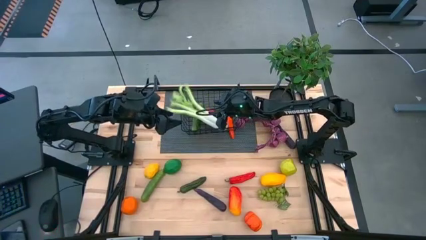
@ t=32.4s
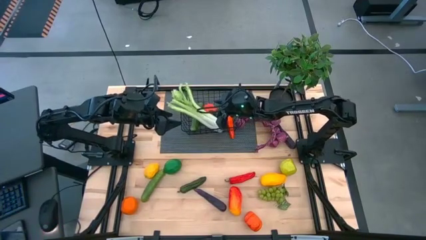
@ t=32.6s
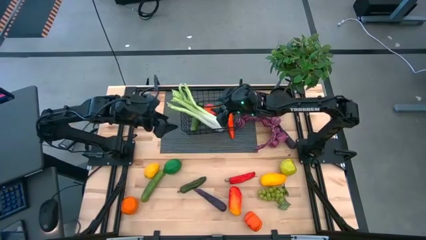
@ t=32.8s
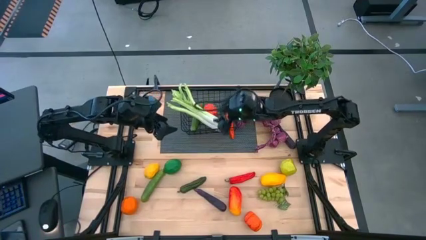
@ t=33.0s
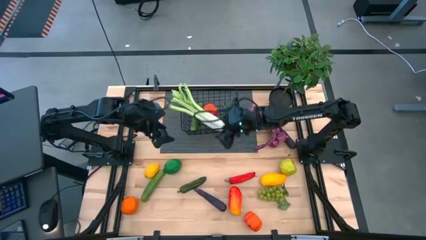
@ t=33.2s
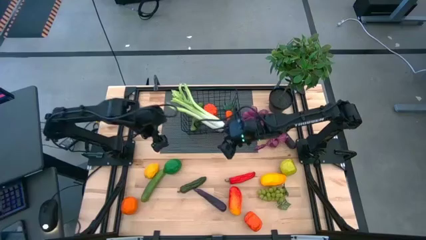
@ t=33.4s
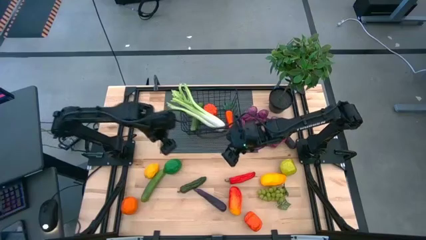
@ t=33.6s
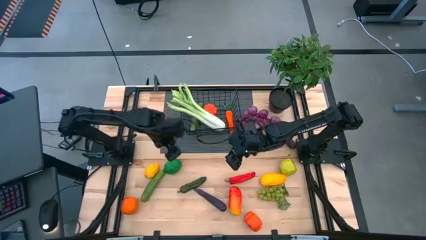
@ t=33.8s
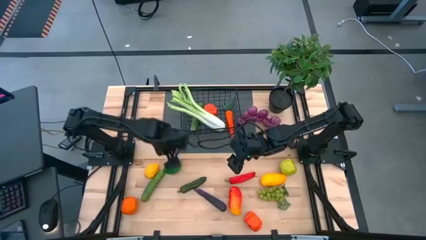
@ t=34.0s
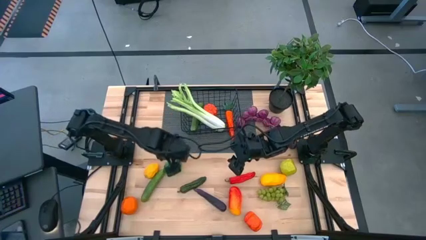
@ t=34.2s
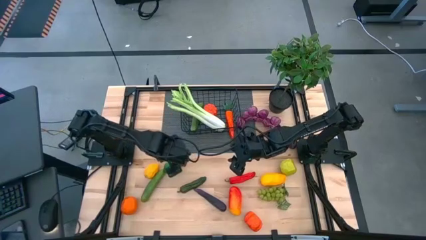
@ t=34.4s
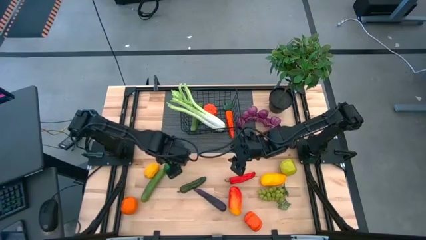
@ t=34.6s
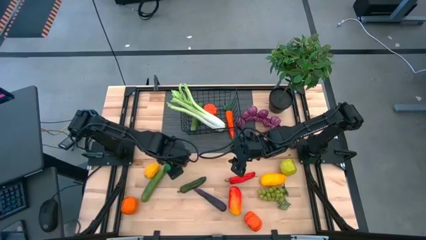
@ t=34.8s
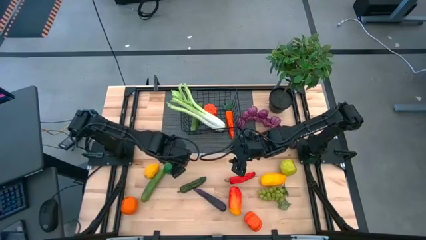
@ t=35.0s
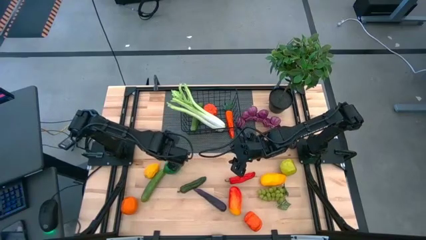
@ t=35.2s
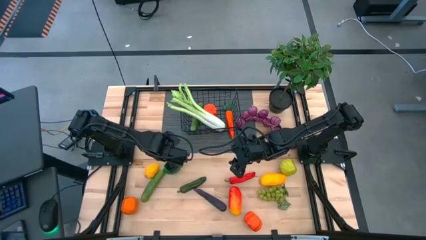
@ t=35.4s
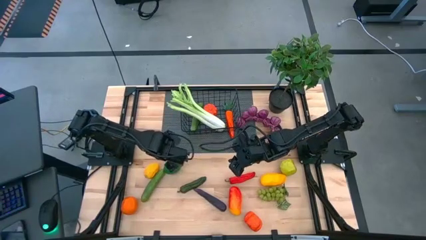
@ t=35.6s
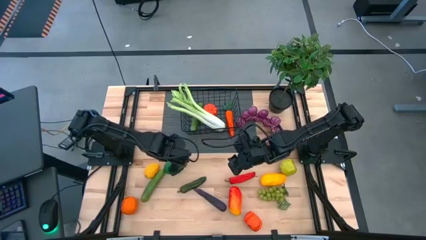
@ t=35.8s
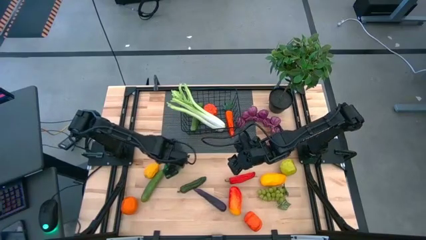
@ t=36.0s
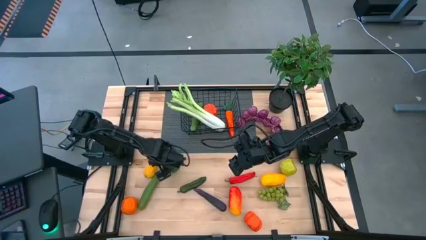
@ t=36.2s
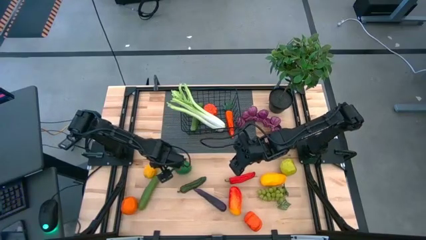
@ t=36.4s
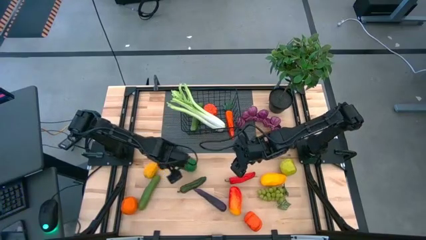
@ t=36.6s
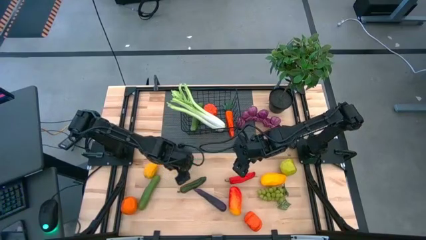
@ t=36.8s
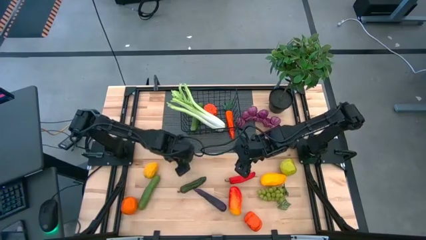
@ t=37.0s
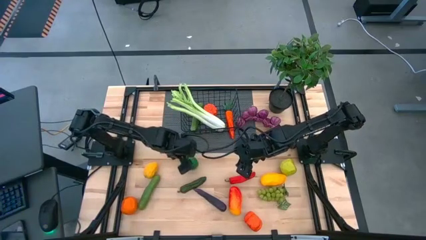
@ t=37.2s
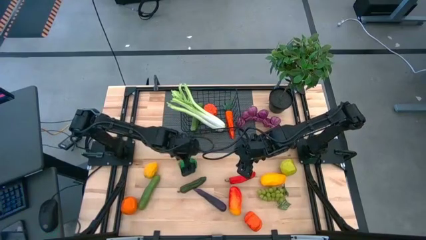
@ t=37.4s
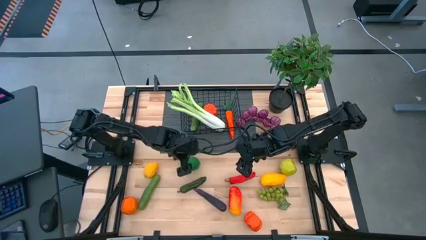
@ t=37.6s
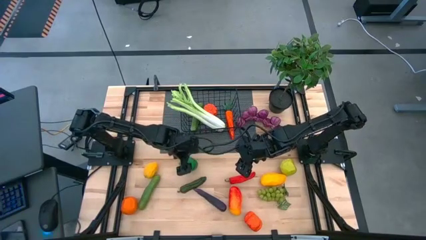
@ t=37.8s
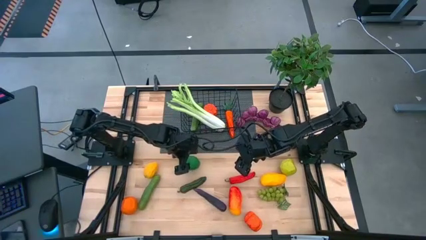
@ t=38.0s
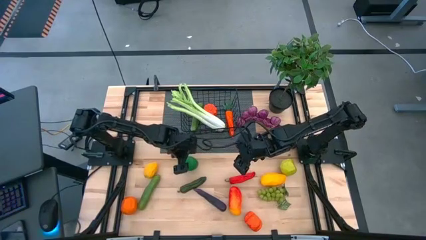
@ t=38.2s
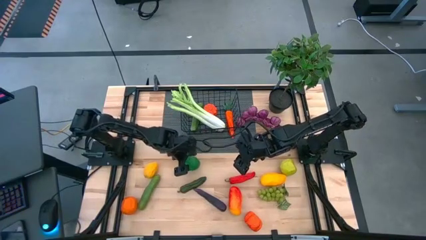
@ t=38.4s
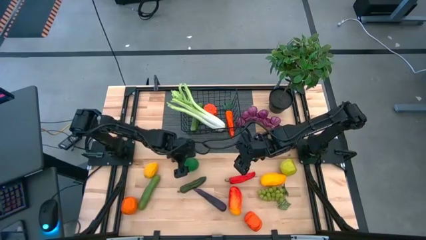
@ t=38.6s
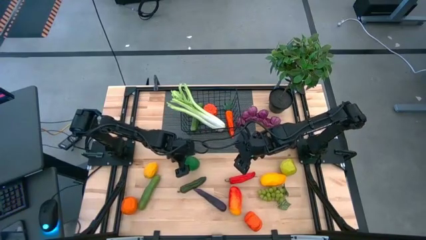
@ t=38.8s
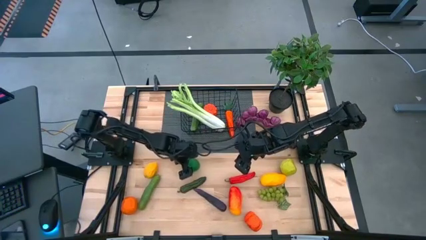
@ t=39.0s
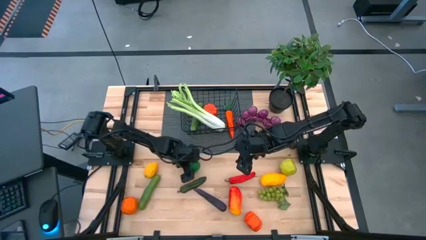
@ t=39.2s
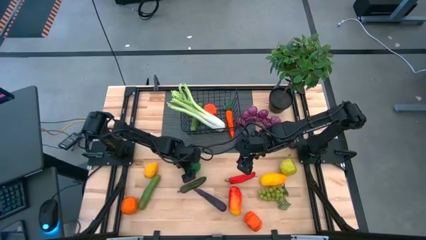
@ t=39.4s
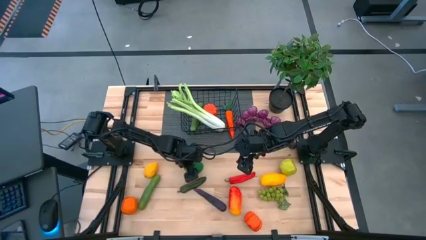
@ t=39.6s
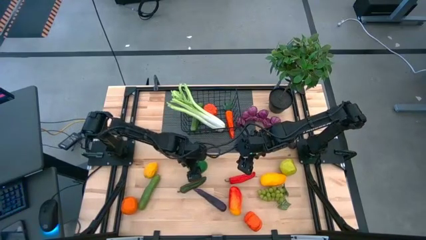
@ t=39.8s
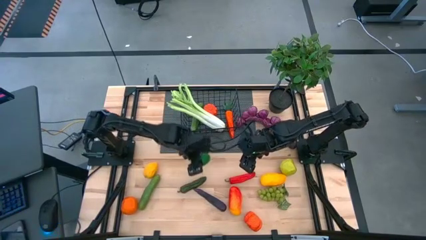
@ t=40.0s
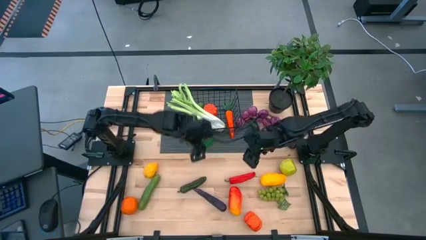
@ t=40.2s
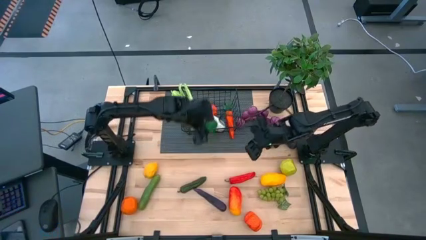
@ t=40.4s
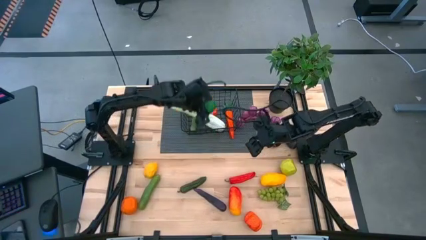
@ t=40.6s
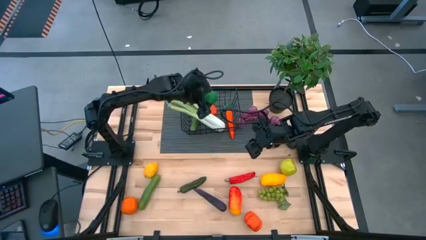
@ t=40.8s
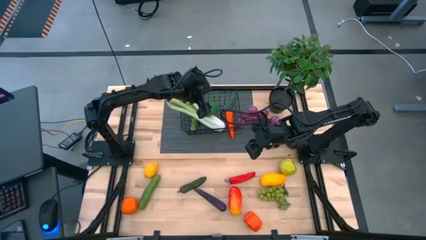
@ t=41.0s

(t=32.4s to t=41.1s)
Task: Build produce basket
Put the lime into the wire basket

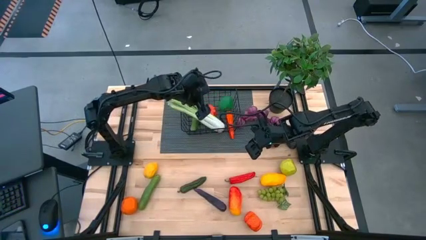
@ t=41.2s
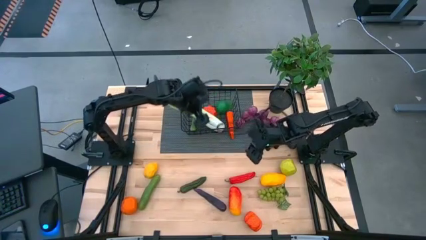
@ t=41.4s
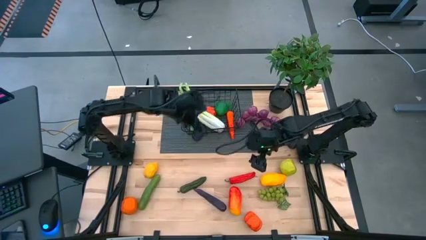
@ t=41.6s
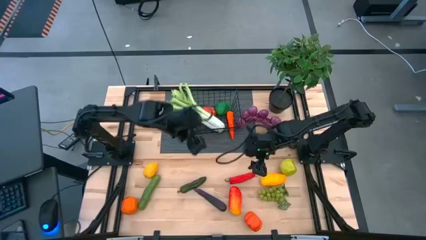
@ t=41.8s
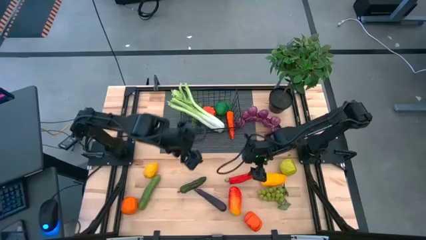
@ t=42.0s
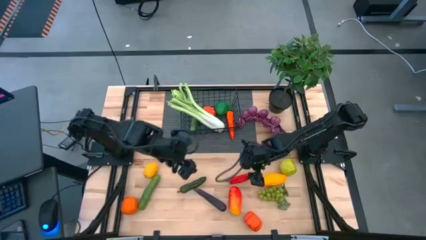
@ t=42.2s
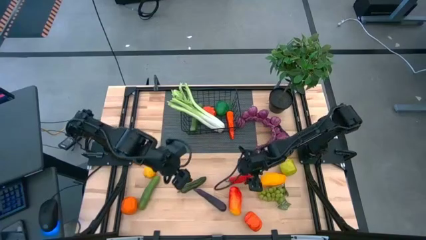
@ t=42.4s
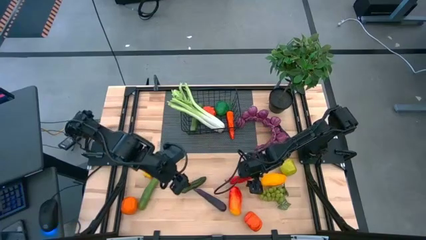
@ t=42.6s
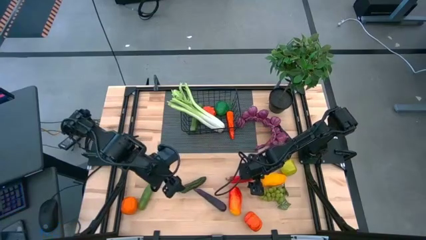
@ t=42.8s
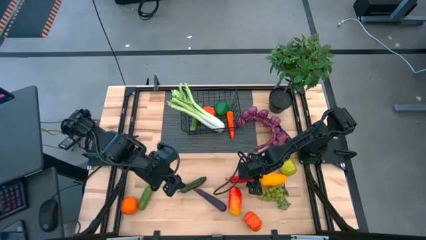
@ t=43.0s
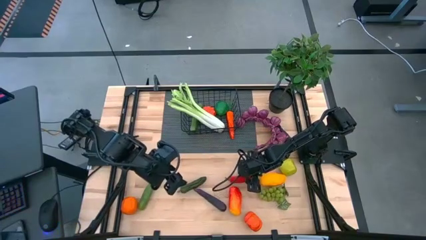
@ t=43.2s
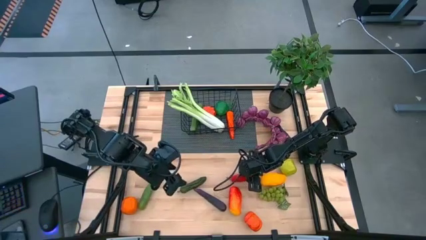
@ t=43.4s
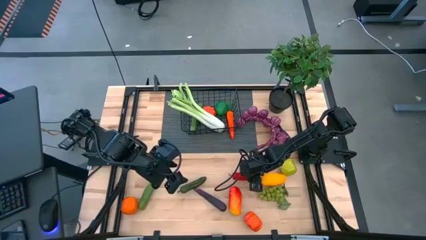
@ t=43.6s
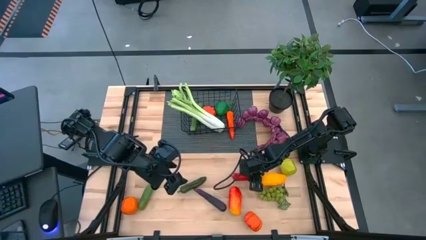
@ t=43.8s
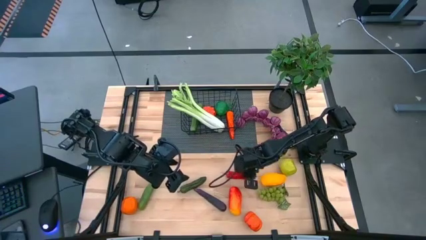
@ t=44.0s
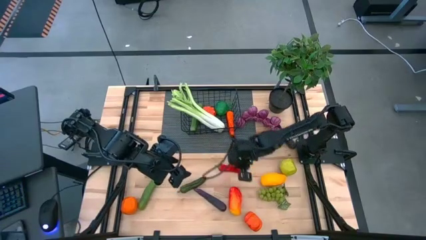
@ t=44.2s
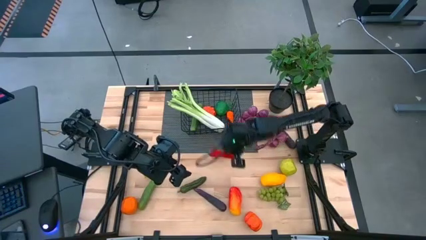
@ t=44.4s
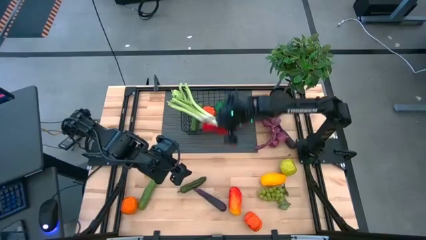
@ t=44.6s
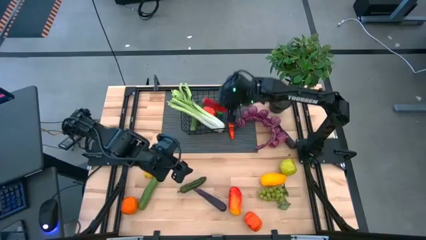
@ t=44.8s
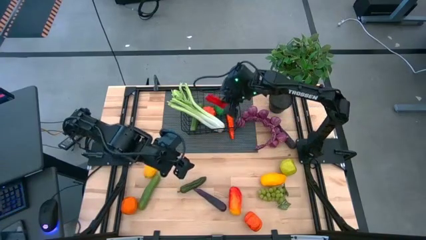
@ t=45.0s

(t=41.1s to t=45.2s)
Put the red chili pepper into the wire basket

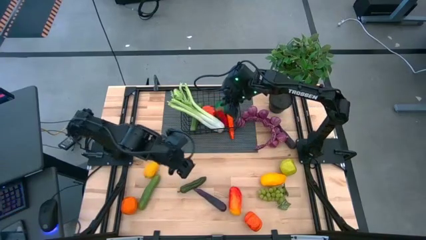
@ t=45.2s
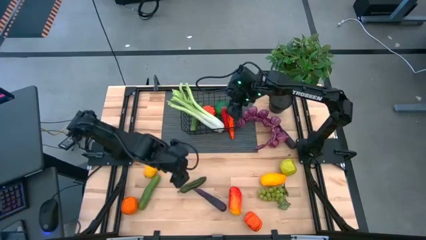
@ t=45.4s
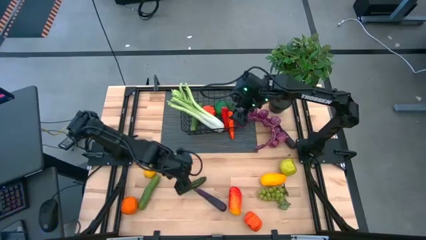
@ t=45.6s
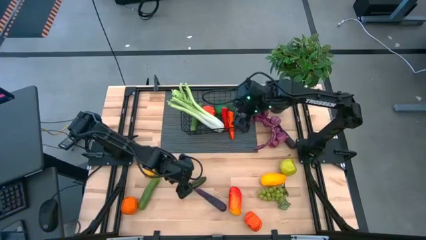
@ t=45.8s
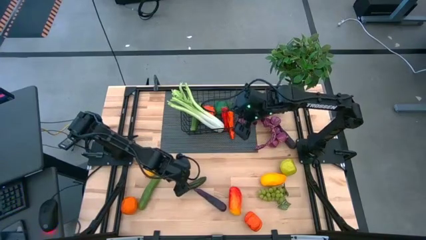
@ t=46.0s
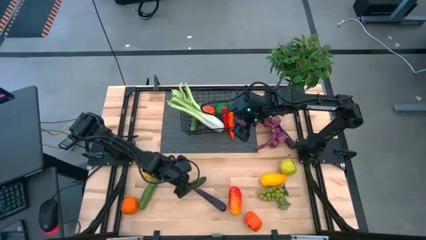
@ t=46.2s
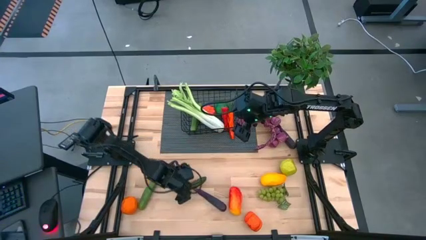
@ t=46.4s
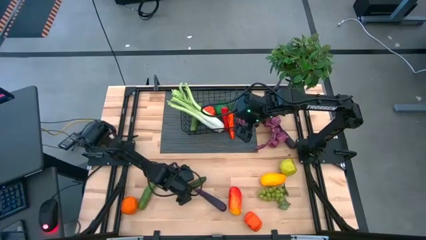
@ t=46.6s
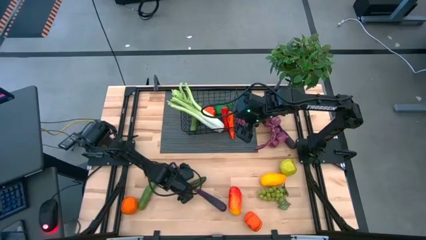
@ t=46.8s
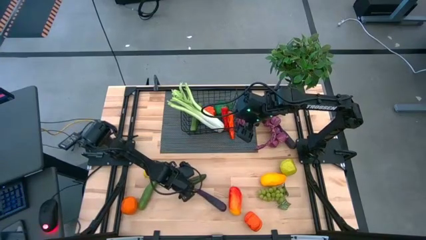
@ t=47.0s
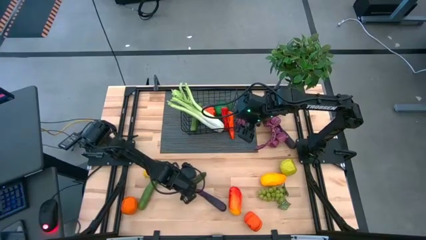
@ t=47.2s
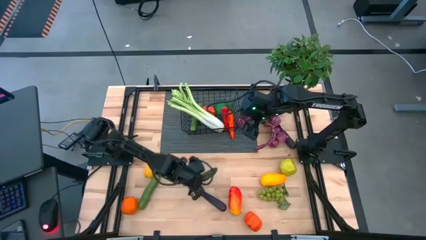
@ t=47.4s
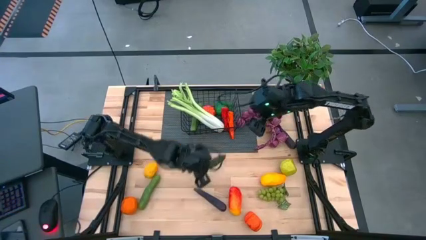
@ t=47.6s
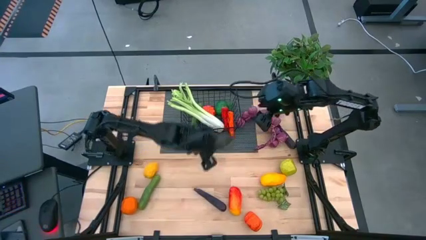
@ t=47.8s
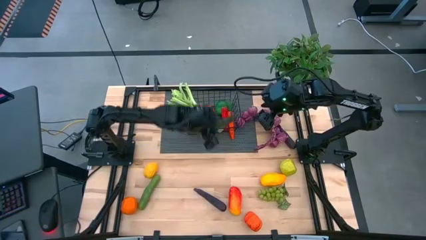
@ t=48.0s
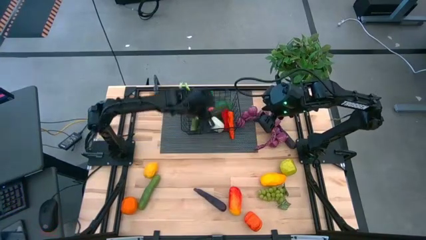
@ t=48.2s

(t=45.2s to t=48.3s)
Put the green chili pepper into the wire basket

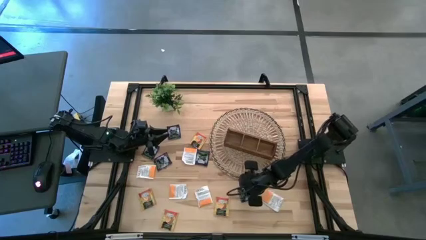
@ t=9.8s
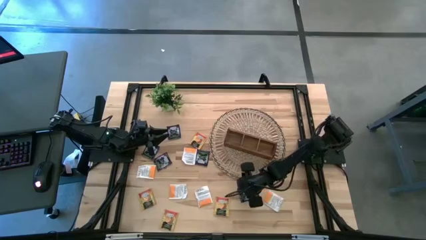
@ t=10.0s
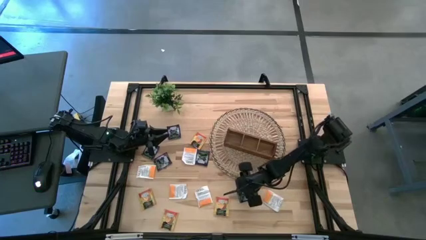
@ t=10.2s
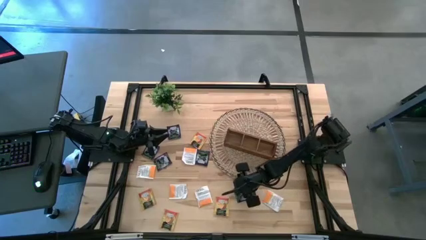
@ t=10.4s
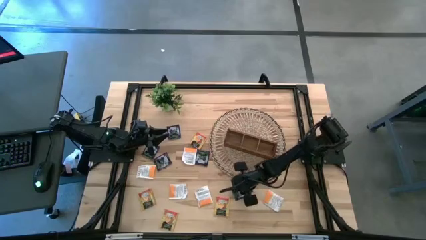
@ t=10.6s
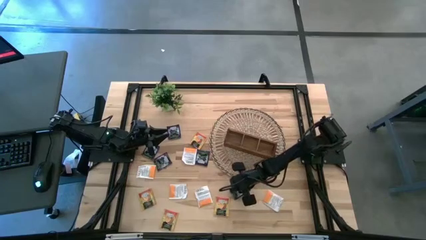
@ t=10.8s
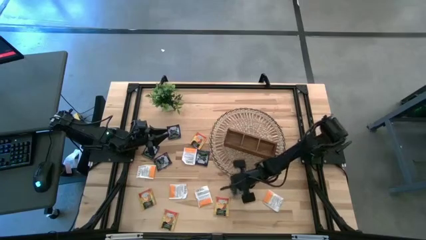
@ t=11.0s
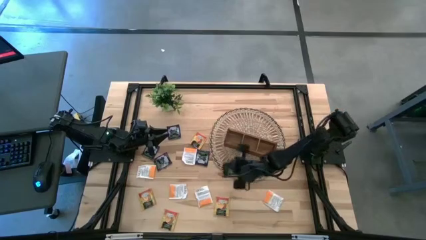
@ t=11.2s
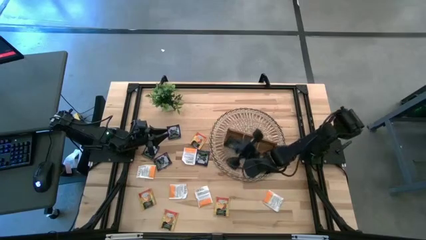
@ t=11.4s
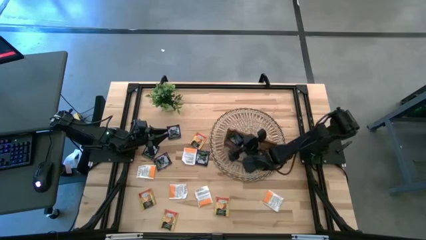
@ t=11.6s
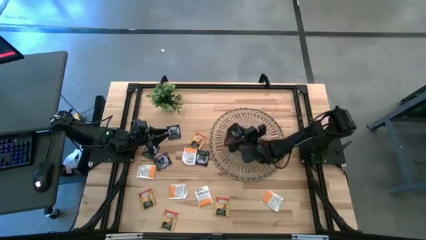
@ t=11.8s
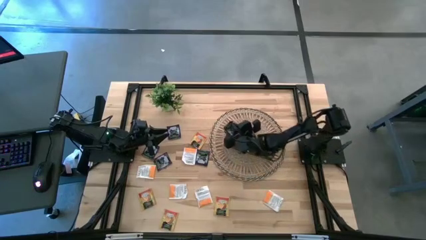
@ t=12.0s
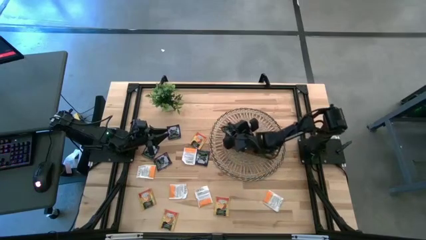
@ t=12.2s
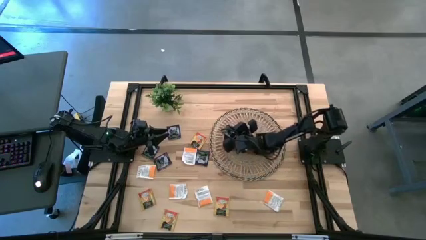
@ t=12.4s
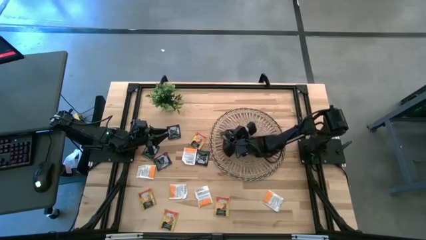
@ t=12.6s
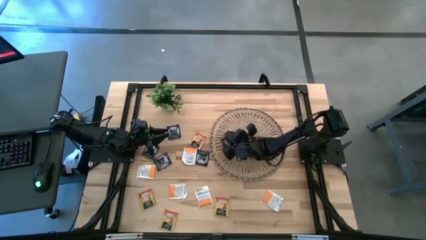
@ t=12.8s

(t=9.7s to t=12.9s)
Task: Pick & Place Tea
Put the violet tea bag into the left section of the wooden organizer
